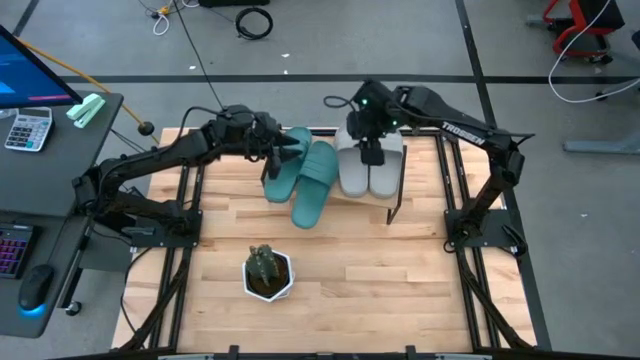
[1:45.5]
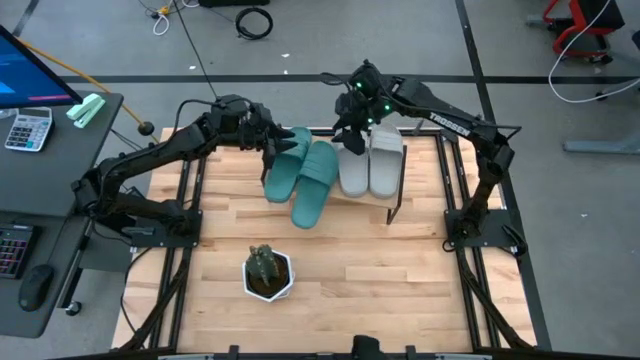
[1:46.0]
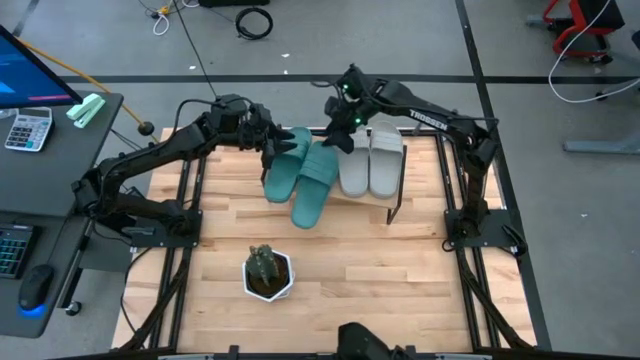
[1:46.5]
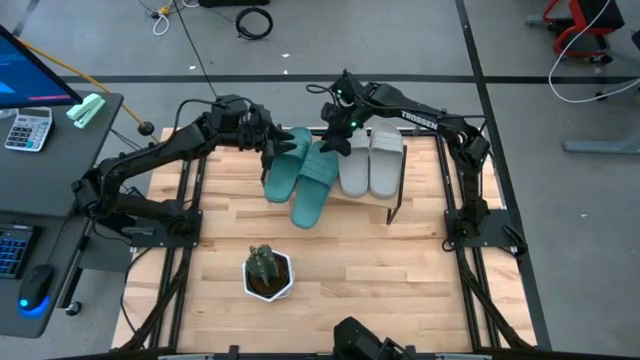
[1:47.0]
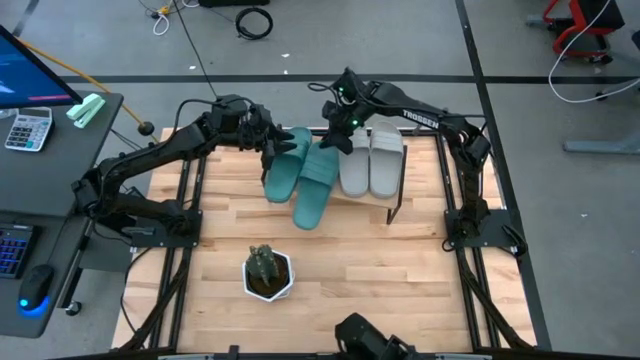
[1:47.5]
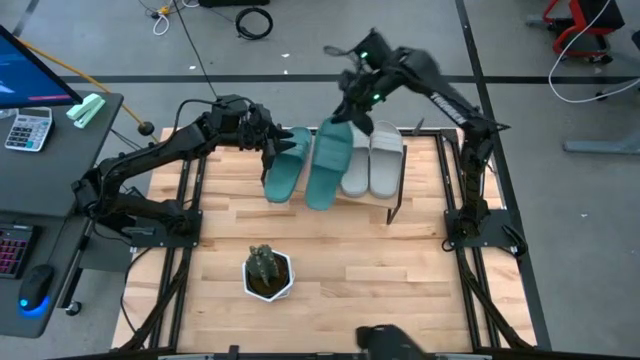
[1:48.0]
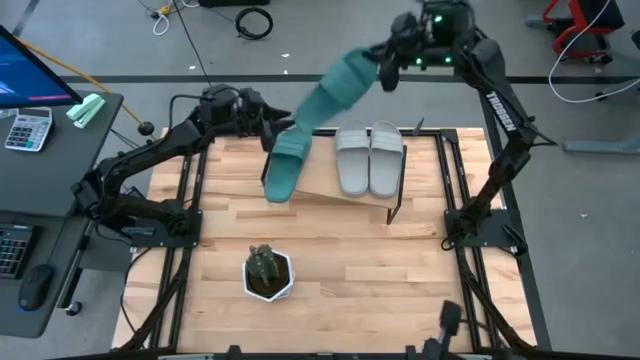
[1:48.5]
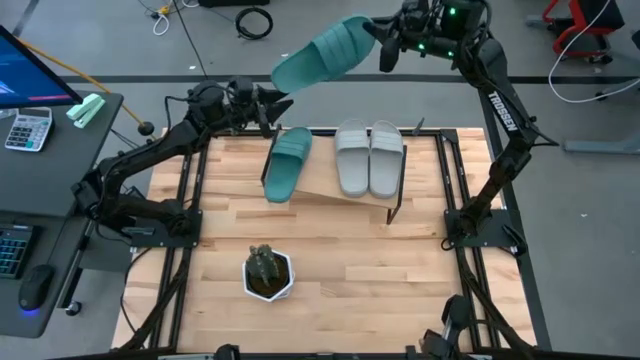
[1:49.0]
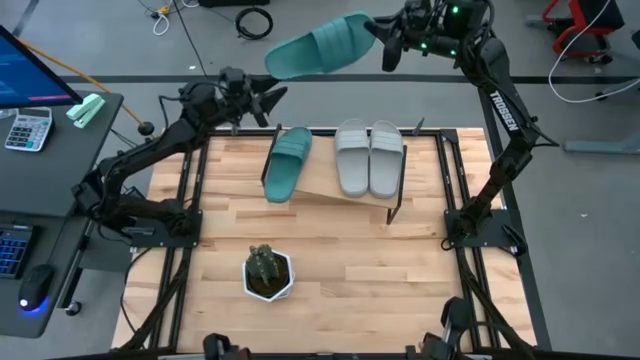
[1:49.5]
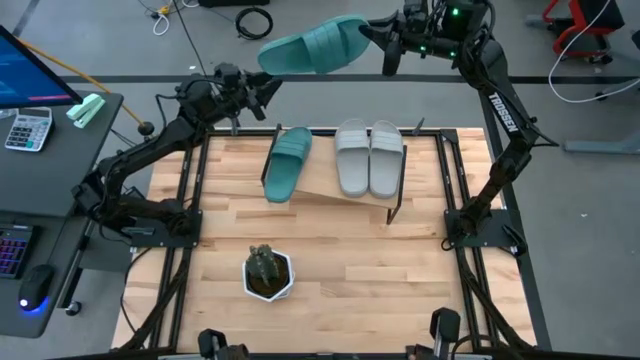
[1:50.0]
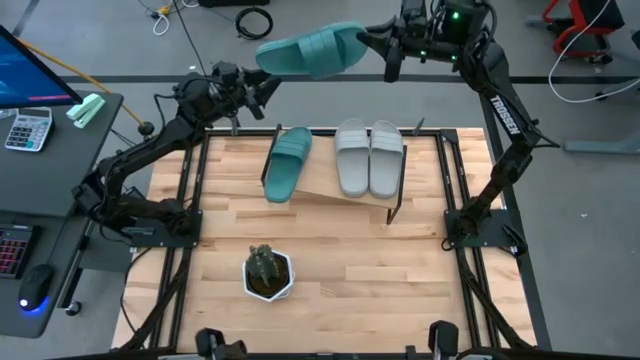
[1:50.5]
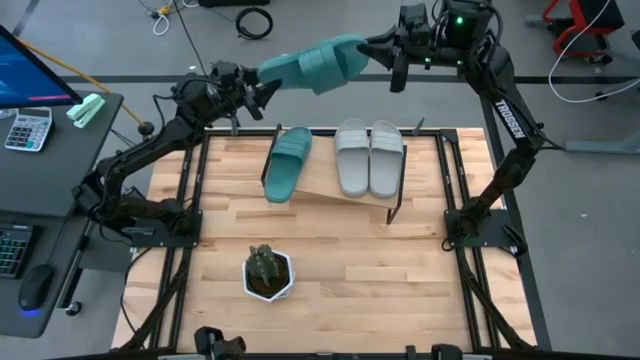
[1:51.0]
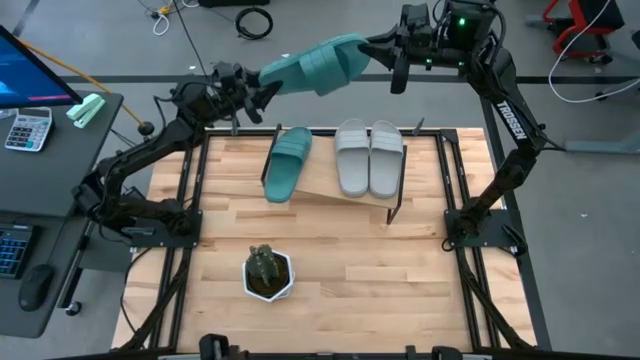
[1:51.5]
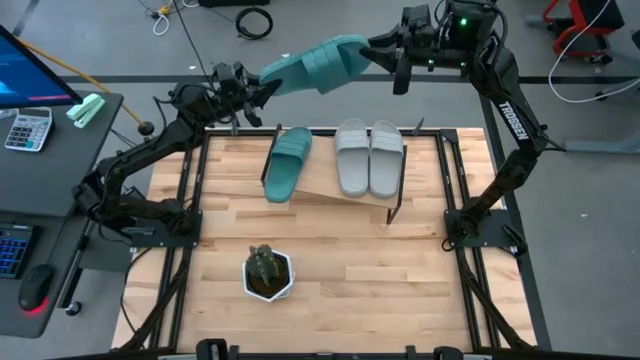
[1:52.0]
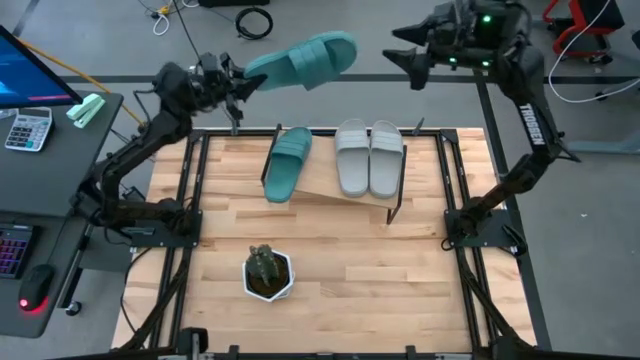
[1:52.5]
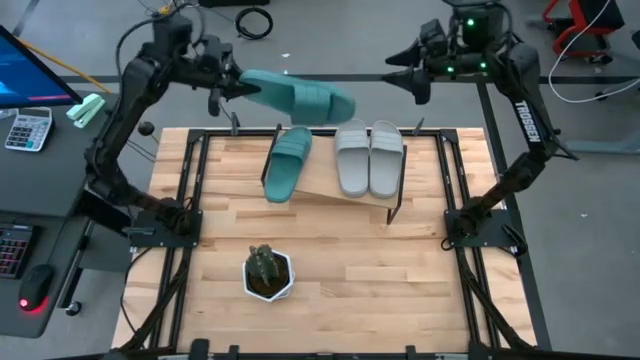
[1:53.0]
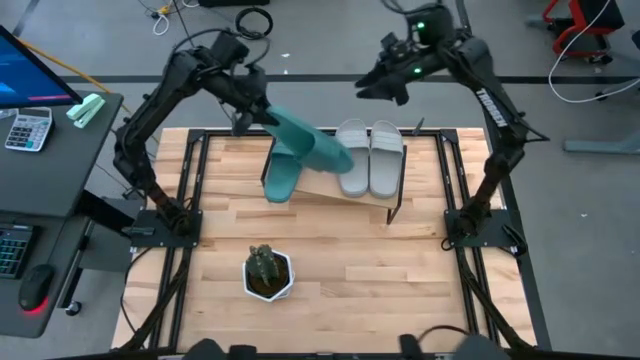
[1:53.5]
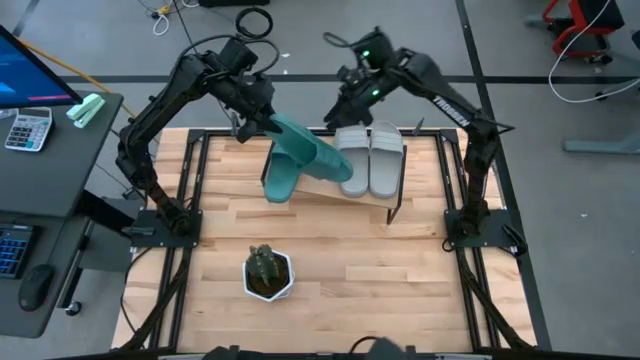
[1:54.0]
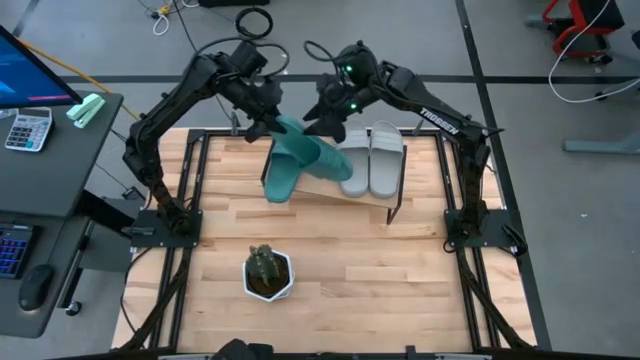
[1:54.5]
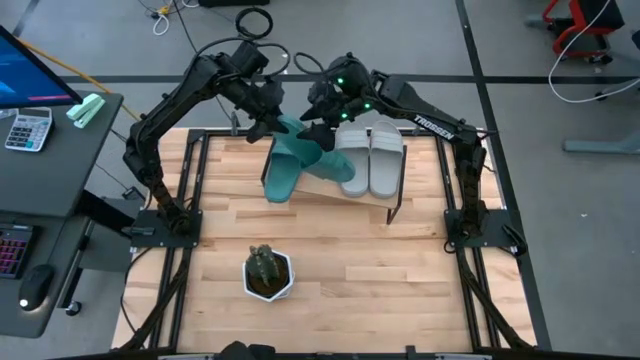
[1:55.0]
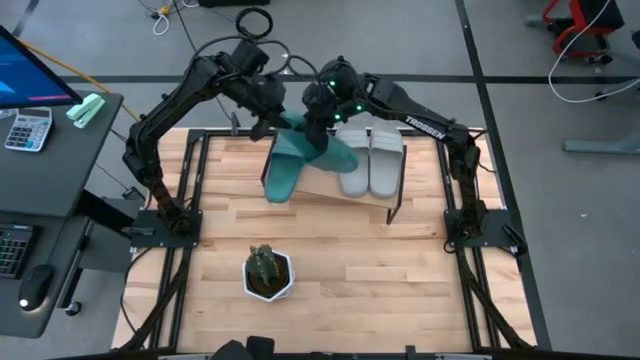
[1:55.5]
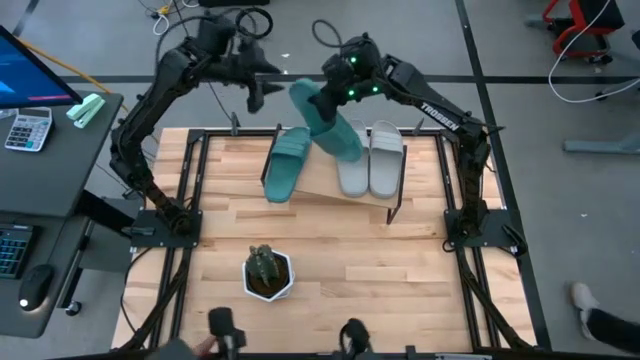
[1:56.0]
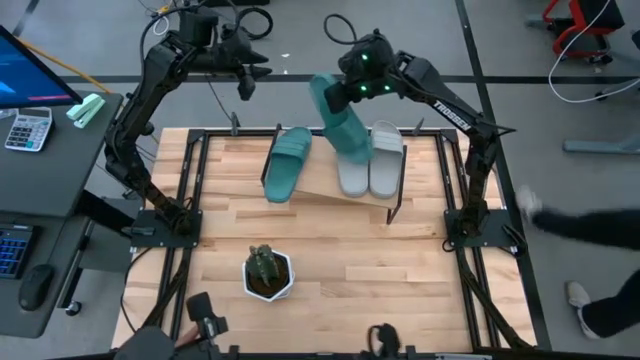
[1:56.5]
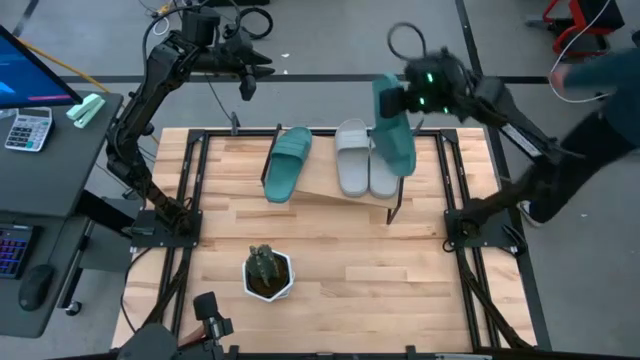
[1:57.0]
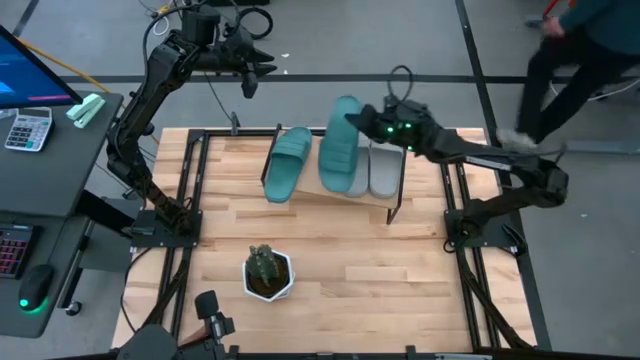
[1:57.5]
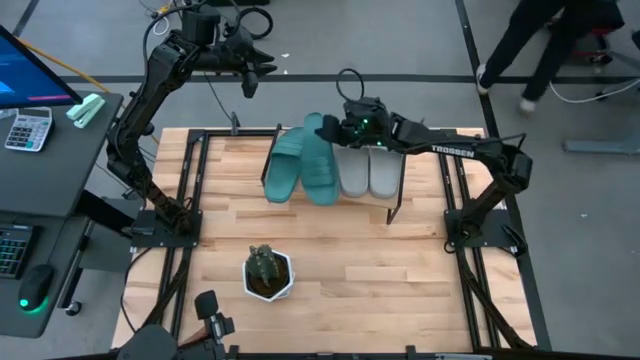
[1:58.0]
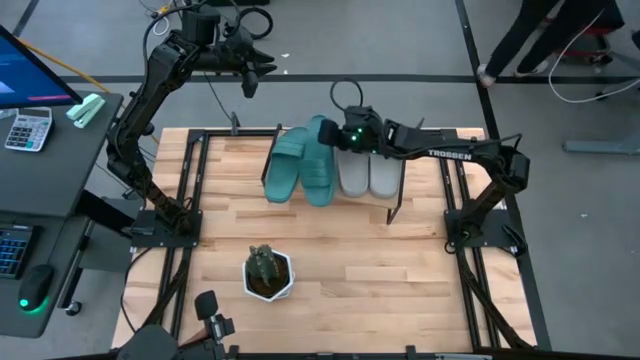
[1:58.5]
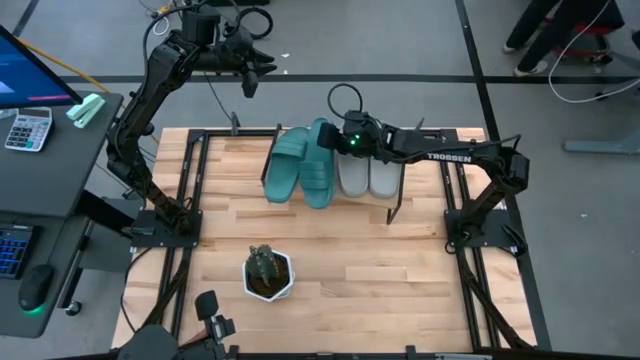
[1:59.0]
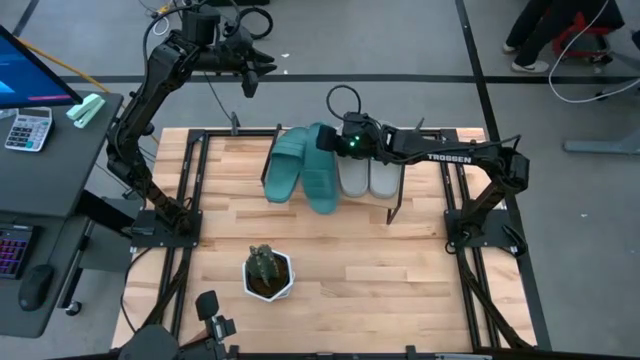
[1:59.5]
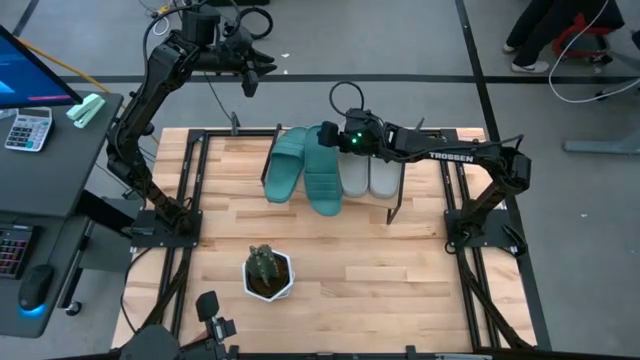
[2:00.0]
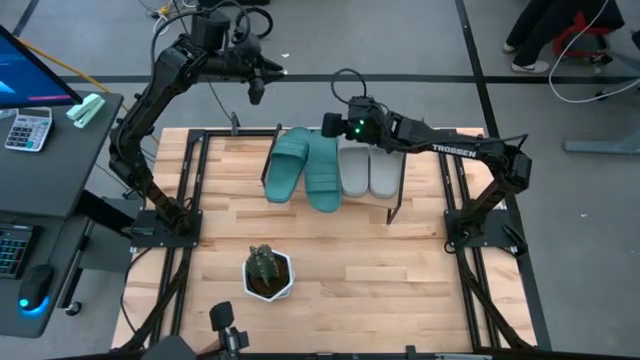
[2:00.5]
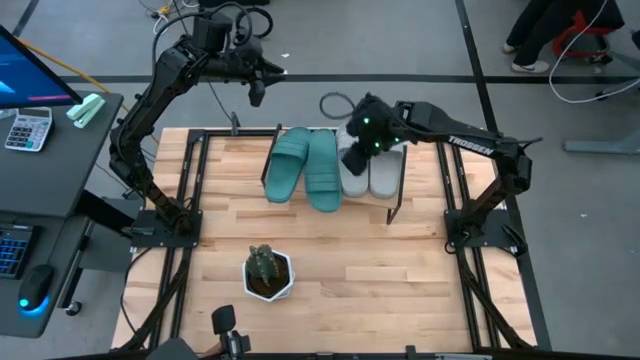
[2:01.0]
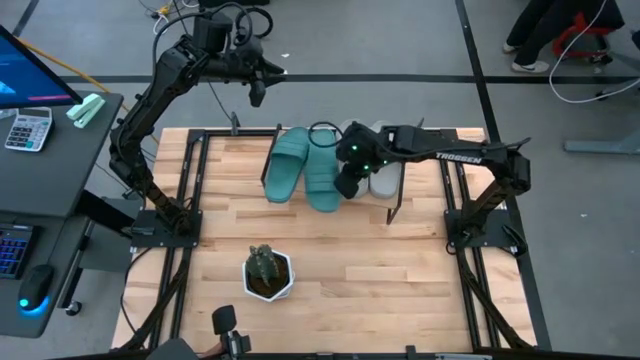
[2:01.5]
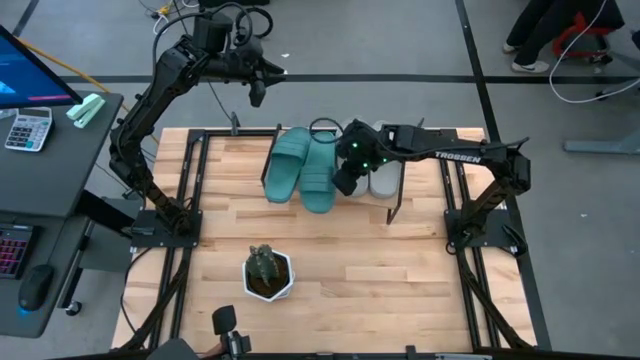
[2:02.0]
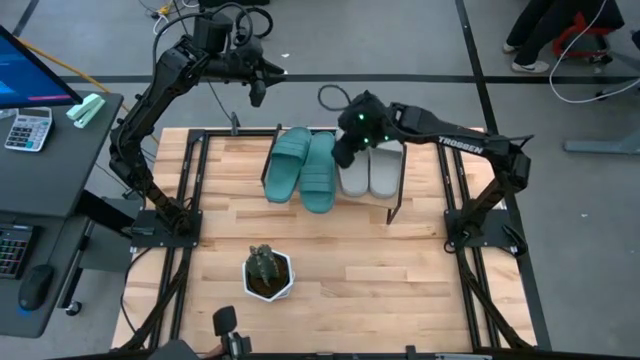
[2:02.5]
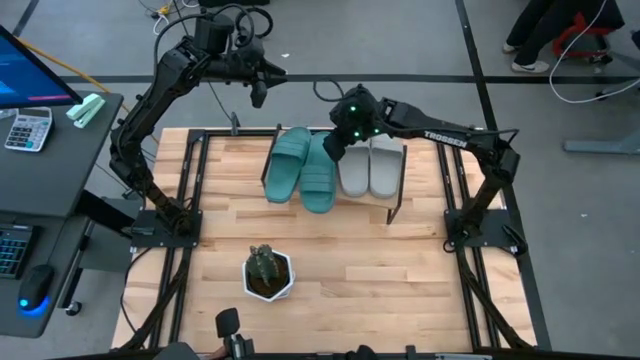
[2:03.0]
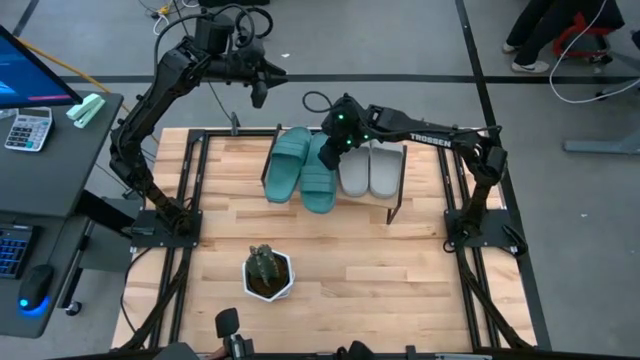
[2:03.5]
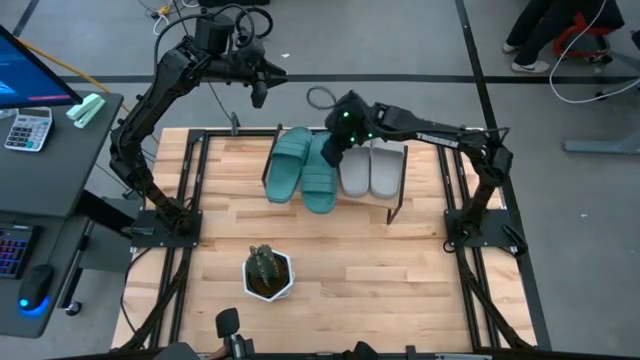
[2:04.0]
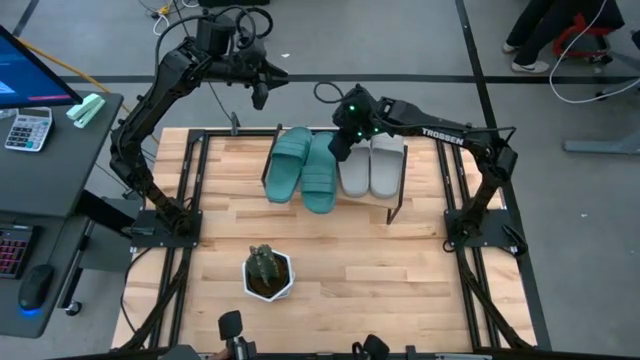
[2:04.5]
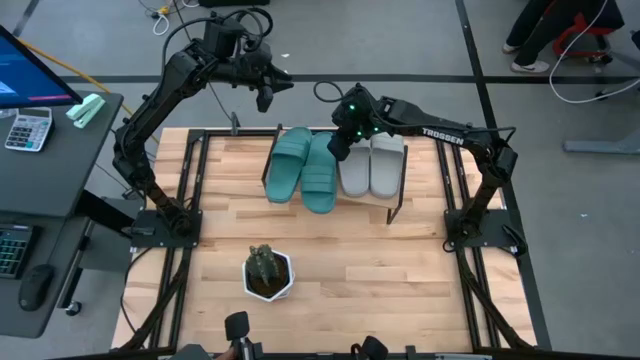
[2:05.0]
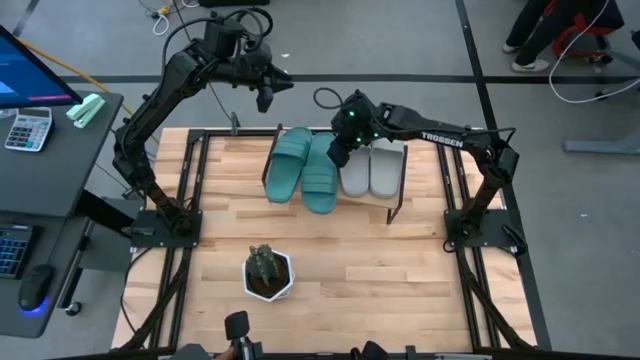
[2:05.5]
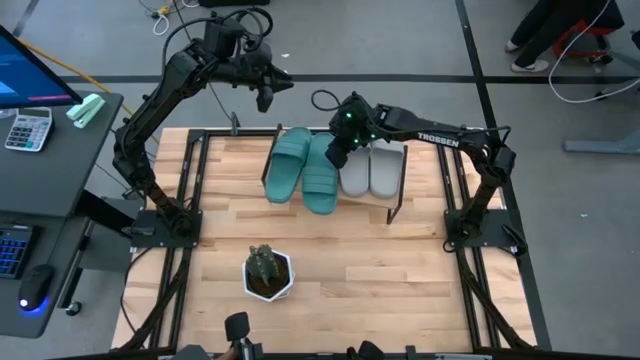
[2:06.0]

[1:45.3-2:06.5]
Task: Pick and place slides into the shelf
Adjust the green slide on the shelf
